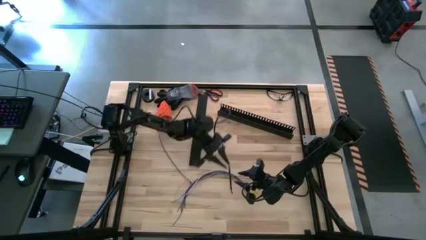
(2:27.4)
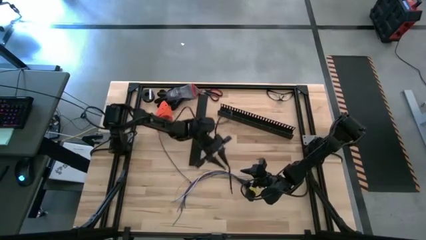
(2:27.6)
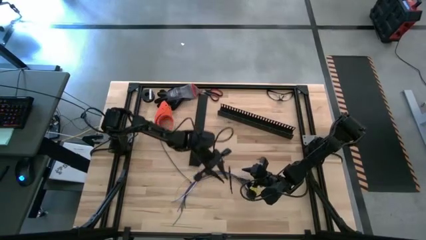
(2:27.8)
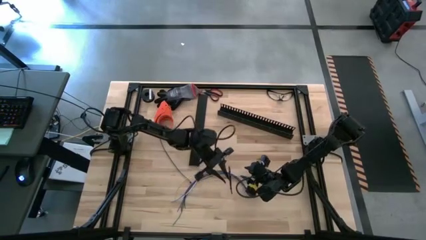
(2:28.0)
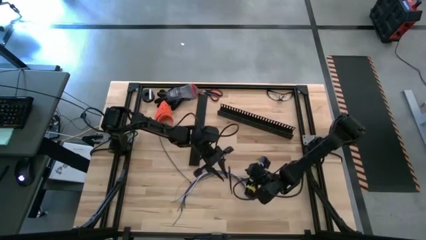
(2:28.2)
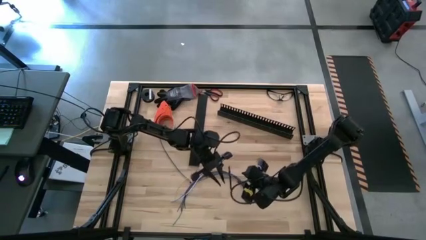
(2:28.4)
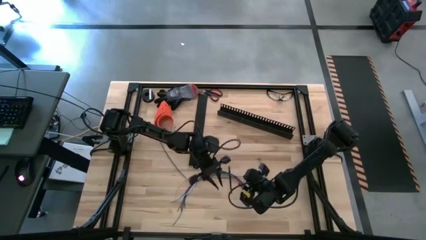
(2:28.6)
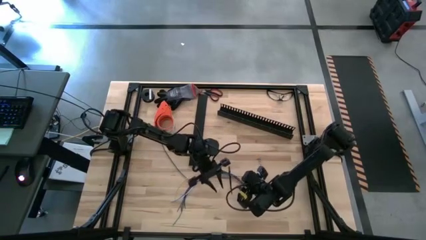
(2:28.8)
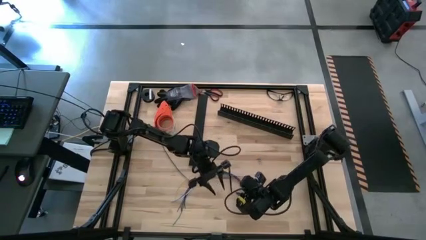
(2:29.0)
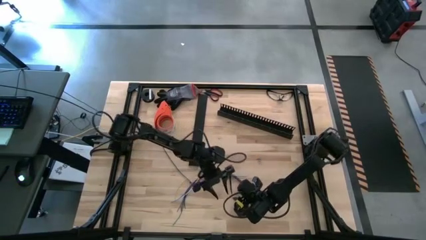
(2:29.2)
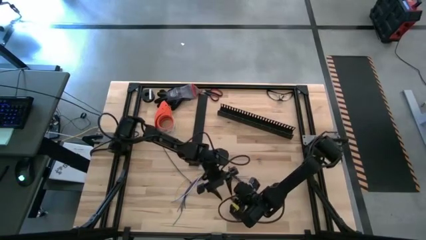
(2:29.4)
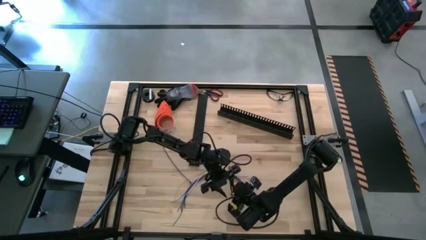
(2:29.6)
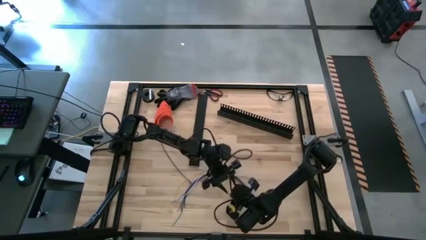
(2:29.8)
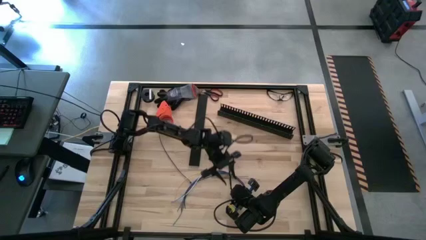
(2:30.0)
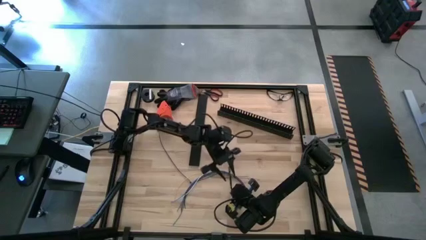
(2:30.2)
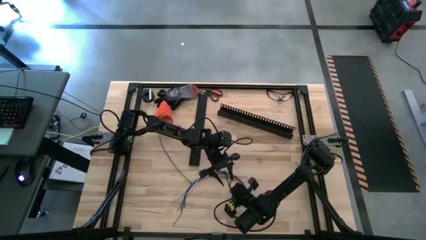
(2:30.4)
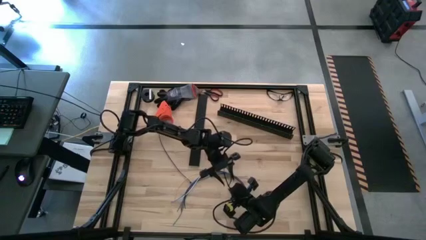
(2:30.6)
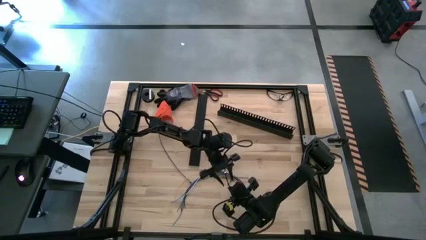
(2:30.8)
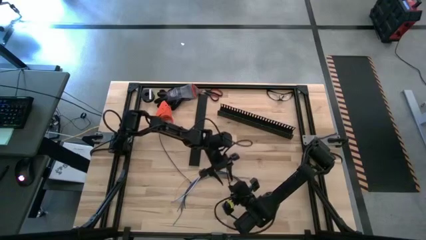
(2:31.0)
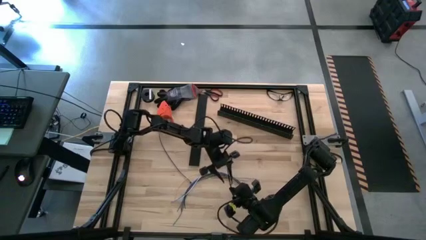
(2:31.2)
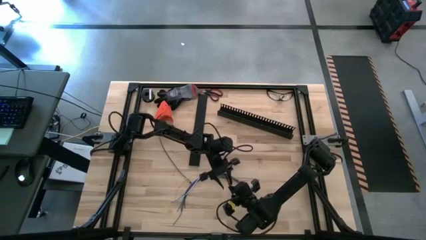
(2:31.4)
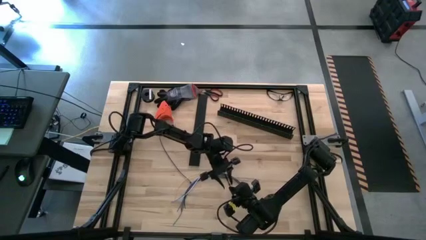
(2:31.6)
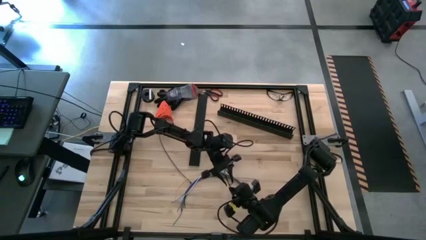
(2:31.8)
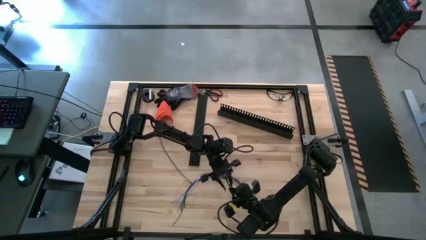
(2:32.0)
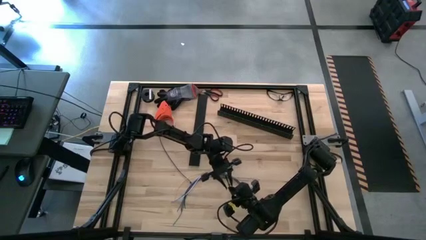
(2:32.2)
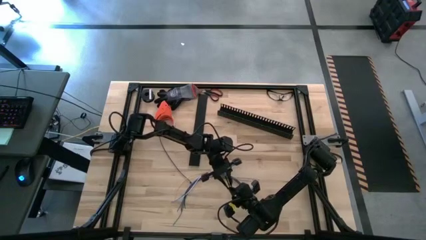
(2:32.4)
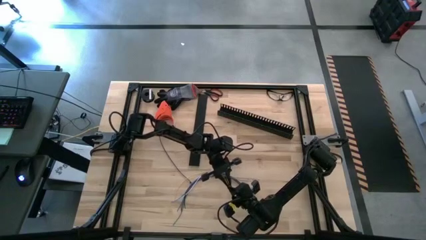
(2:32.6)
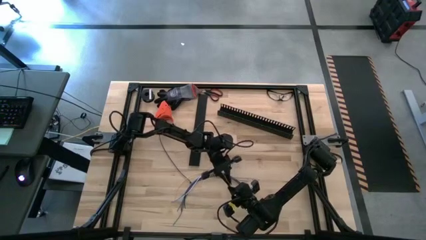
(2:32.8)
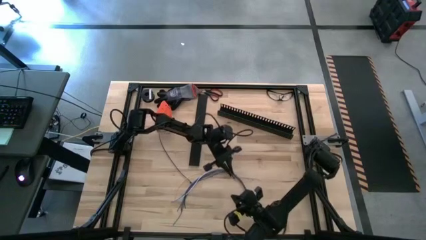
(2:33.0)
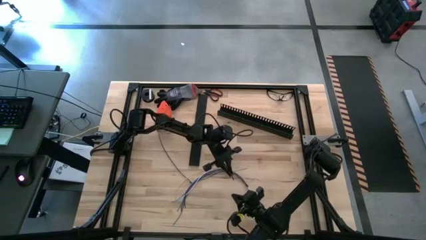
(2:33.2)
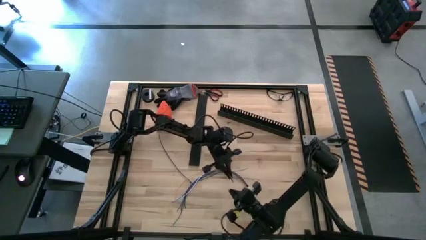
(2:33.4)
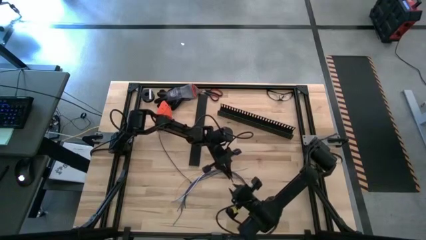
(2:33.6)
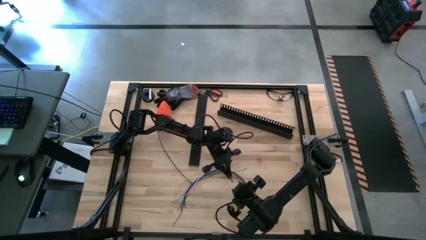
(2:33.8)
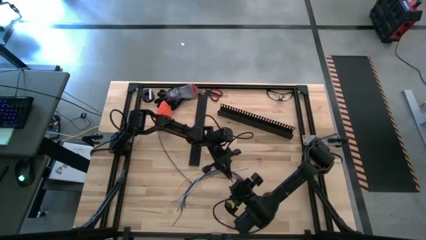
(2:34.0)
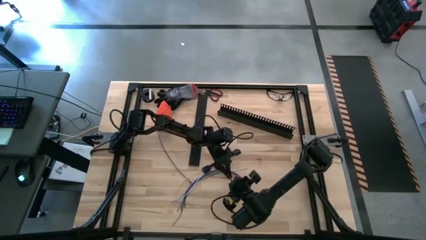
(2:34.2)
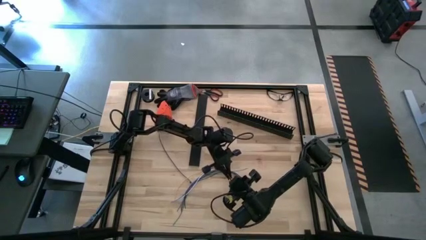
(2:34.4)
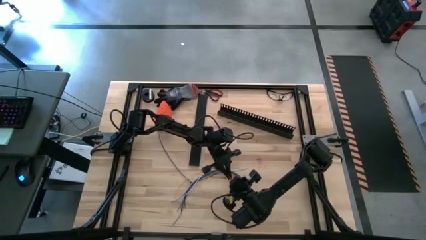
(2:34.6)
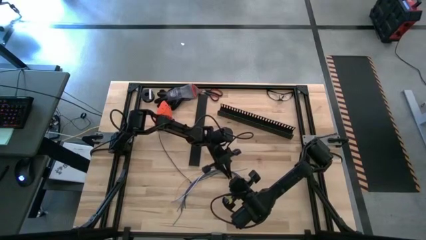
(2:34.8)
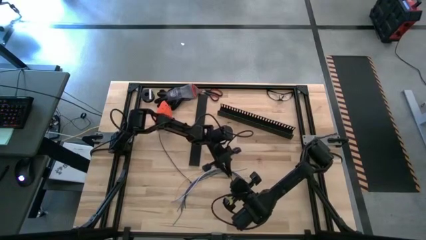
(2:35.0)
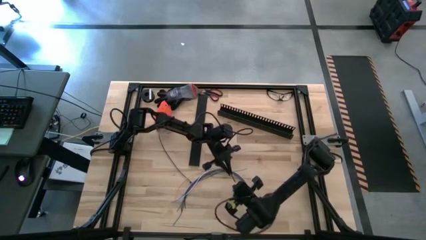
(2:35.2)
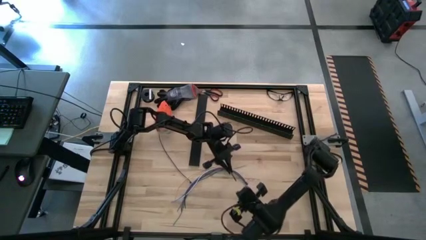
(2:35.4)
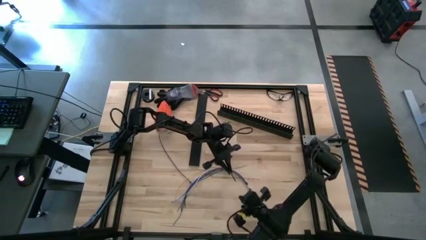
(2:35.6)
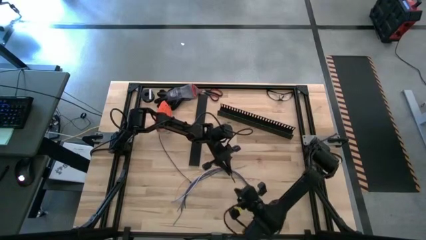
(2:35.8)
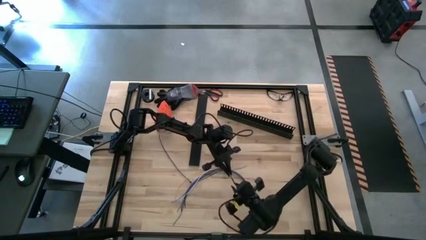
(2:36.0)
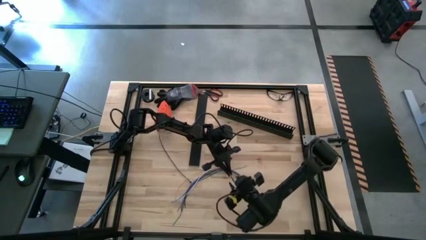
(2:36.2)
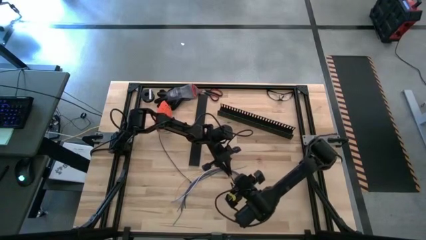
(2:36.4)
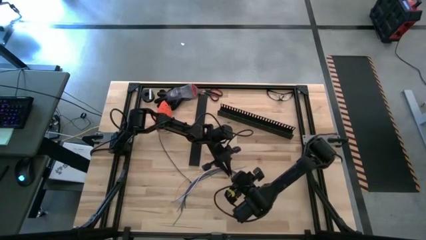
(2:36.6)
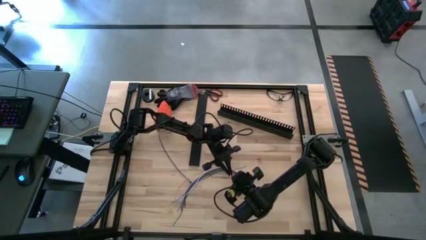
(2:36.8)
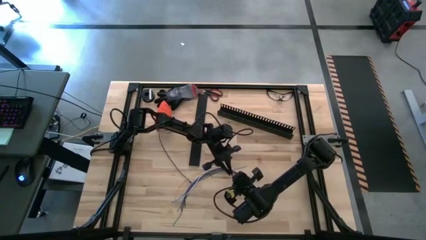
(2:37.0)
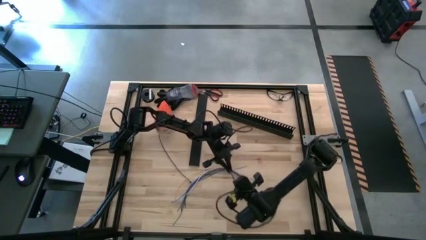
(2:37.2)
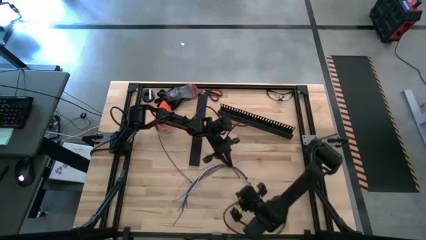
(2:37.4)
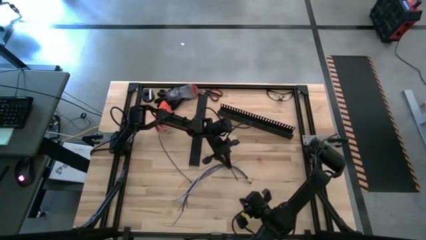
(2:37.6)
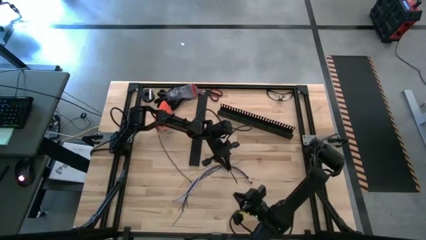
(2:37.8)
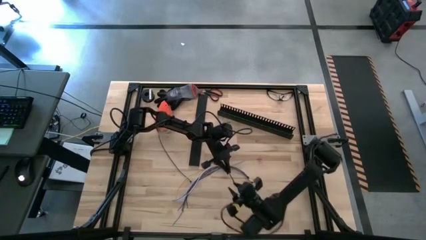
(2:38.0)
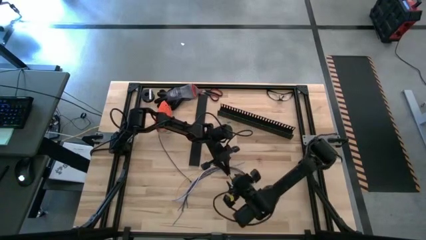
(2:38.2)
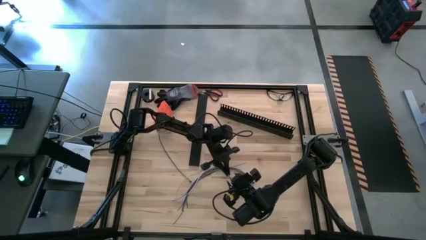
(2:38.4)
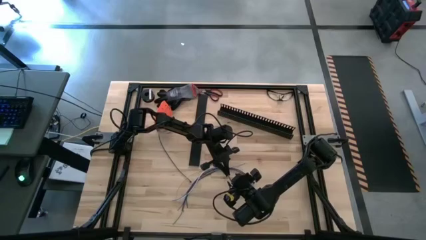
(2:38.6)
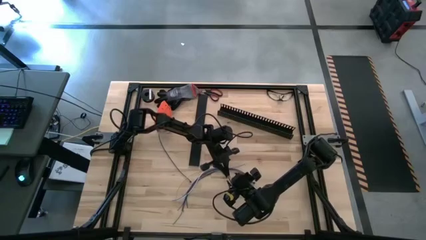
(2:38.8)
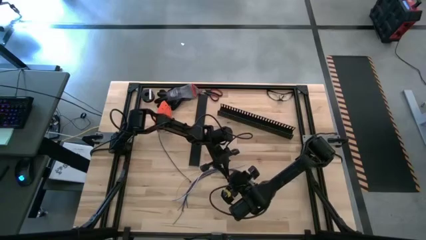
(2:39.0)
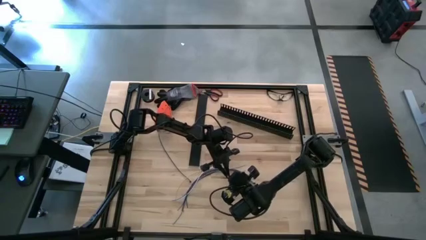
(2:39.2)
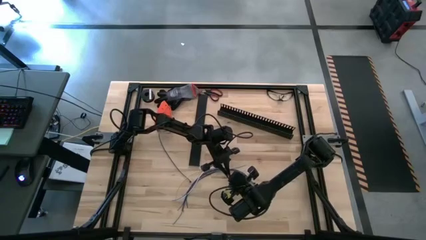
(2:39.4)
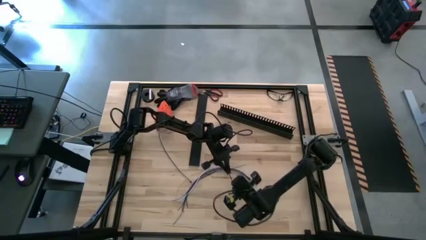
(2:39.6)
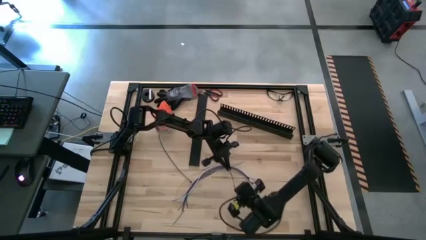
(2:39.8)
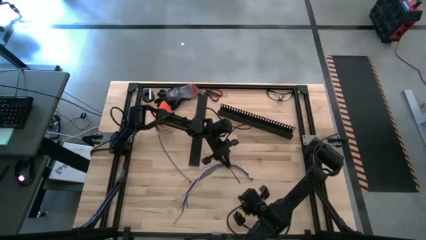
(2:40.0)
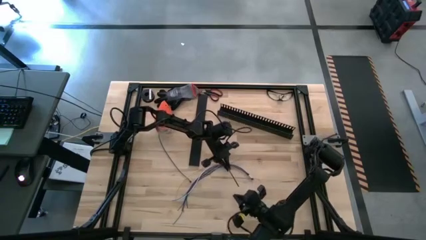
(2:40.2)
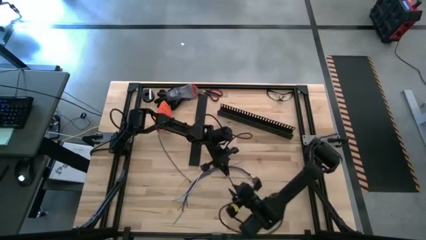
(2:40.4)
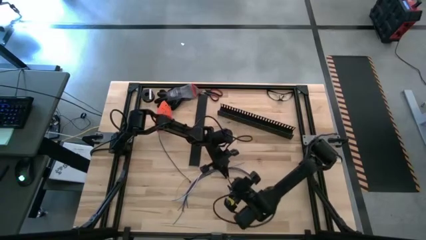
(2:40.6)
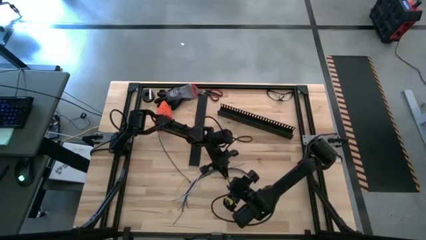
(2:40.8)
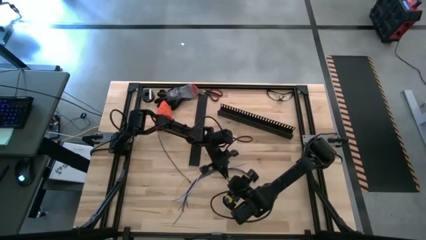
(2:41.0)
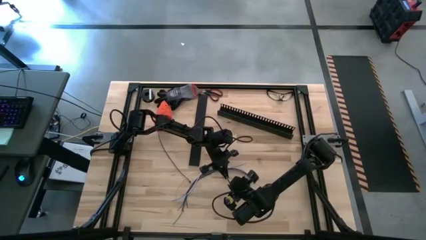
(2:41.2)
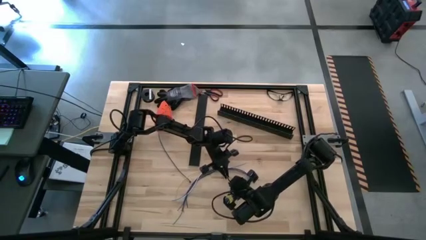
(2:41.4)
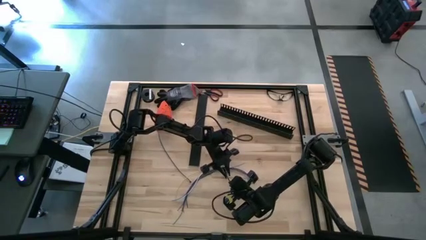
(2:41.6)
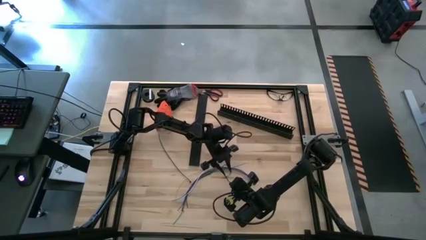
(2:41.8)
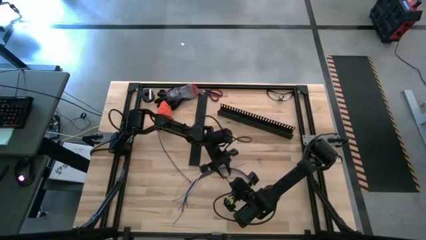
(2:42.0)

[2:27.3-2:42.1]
Task: Ziptie cables
Wrap the black zip tie on the cables
